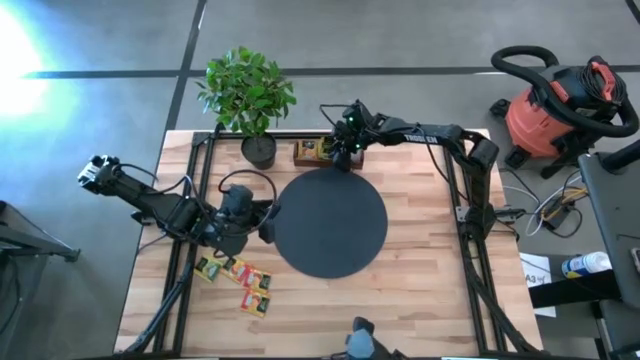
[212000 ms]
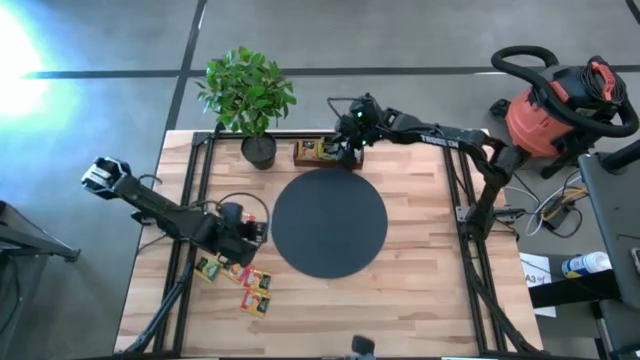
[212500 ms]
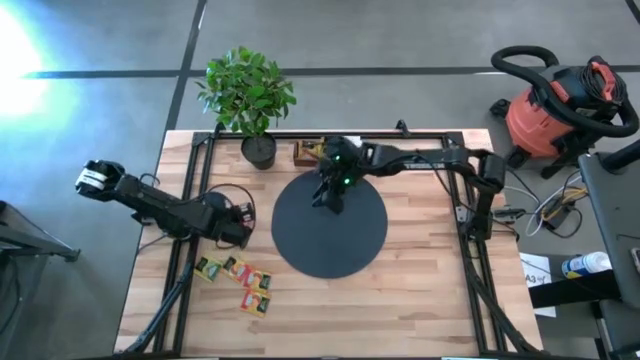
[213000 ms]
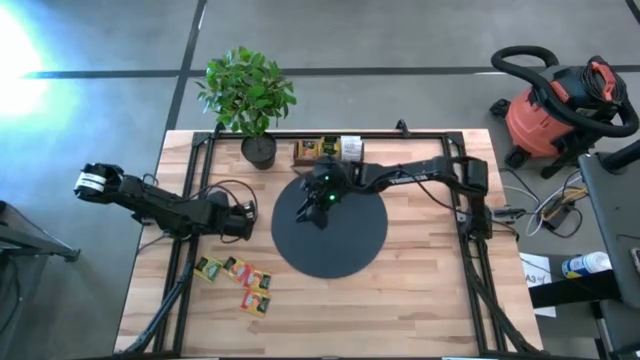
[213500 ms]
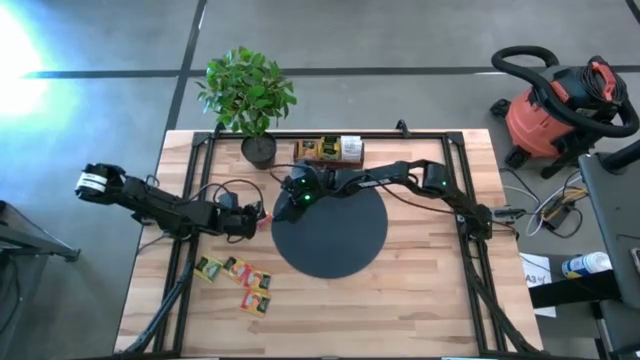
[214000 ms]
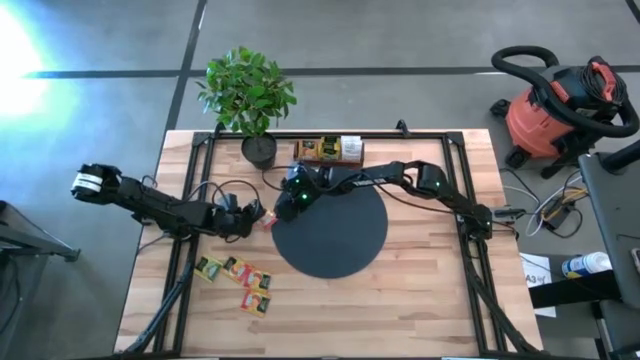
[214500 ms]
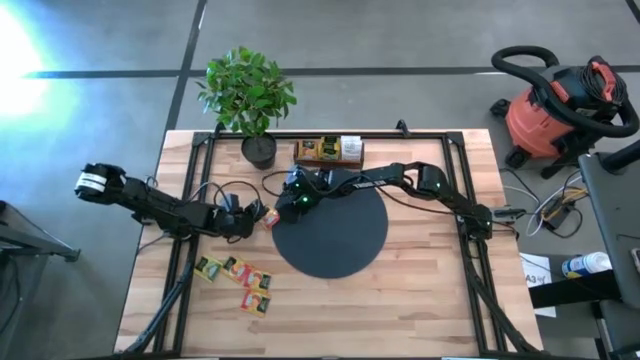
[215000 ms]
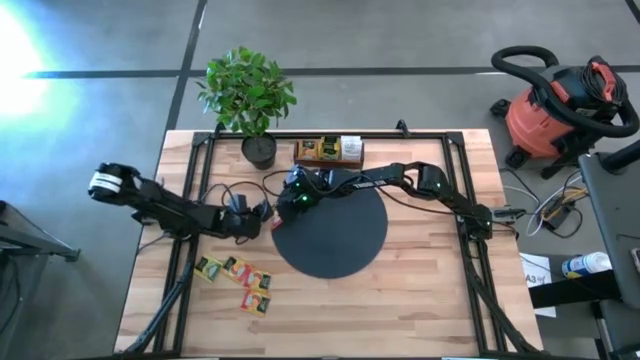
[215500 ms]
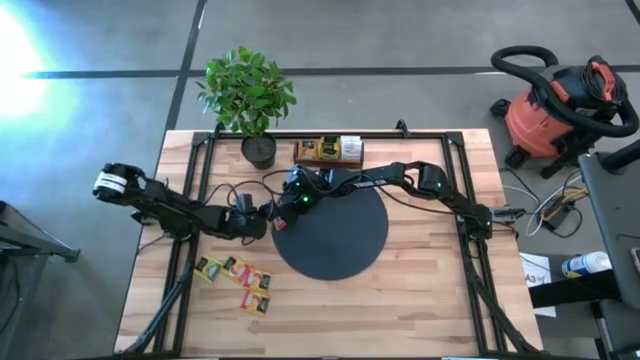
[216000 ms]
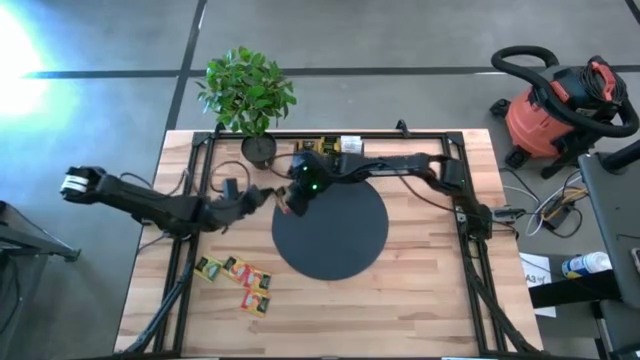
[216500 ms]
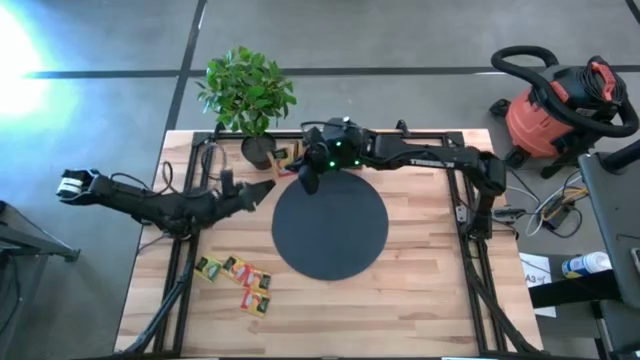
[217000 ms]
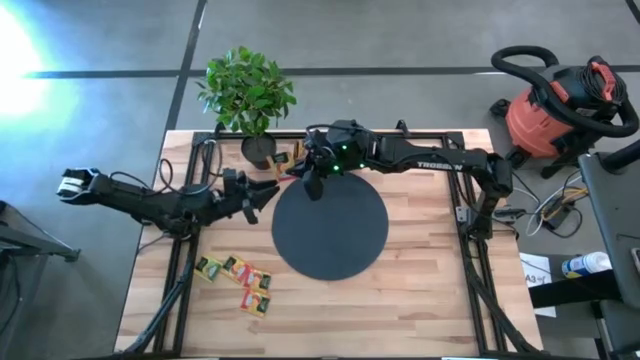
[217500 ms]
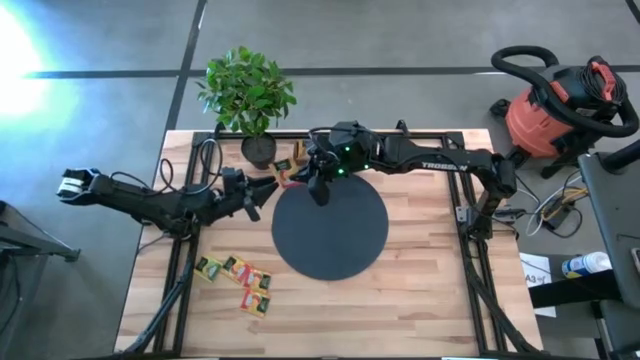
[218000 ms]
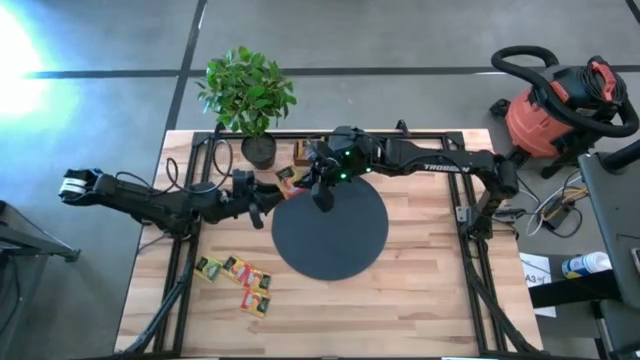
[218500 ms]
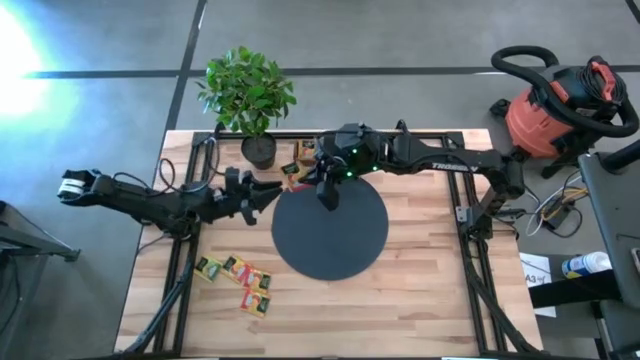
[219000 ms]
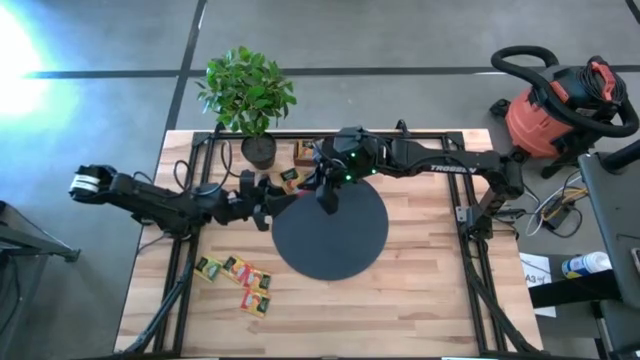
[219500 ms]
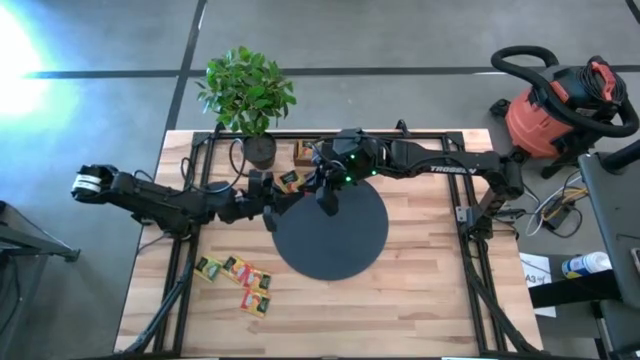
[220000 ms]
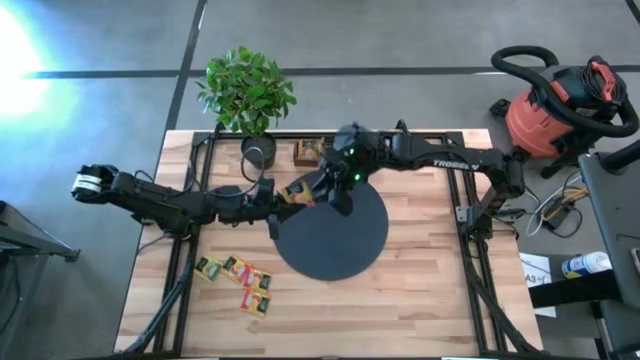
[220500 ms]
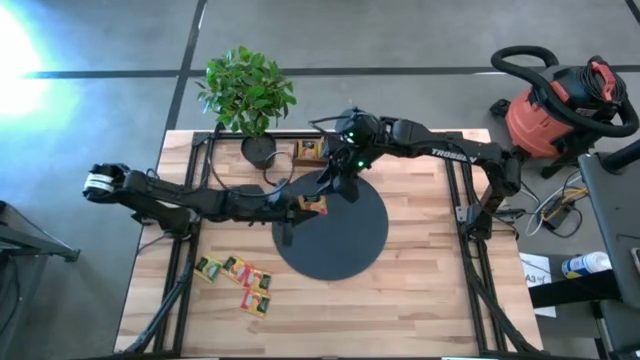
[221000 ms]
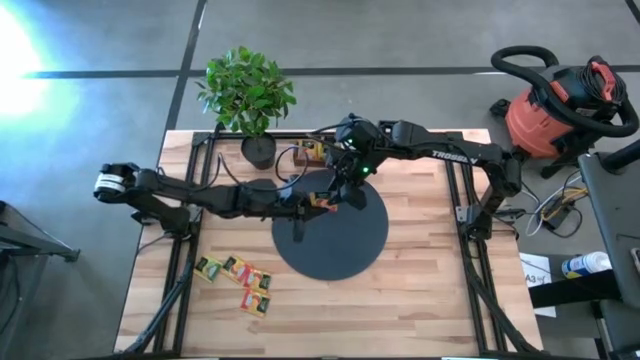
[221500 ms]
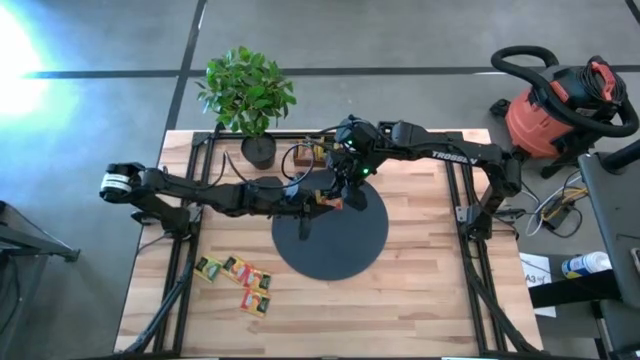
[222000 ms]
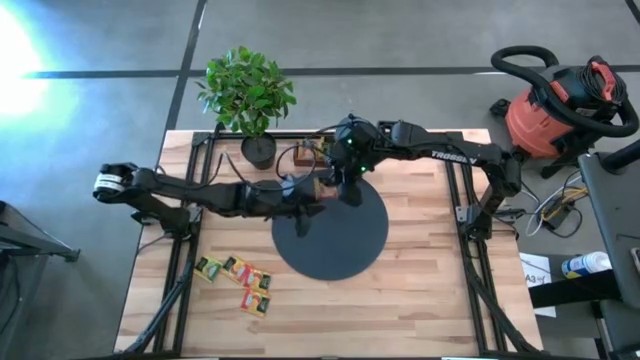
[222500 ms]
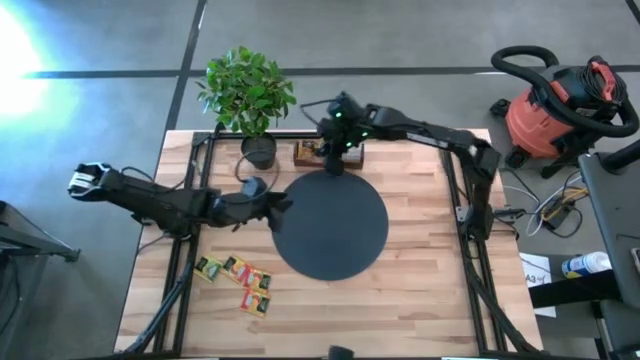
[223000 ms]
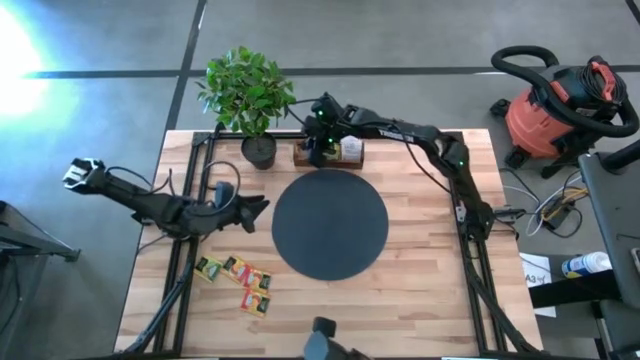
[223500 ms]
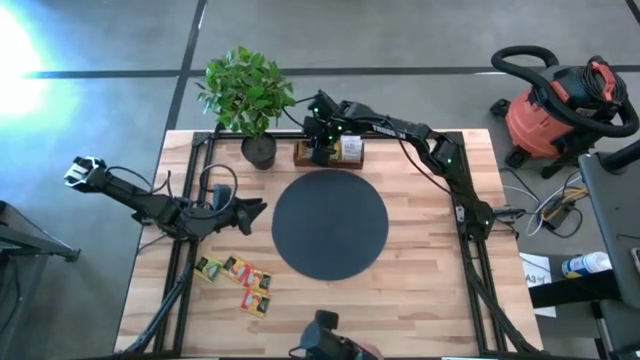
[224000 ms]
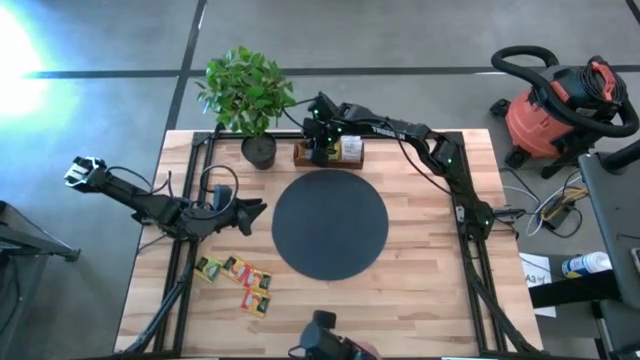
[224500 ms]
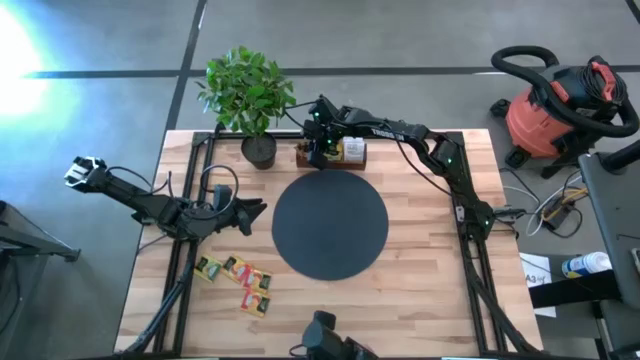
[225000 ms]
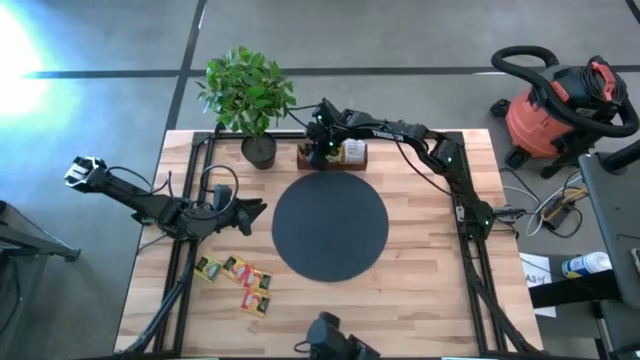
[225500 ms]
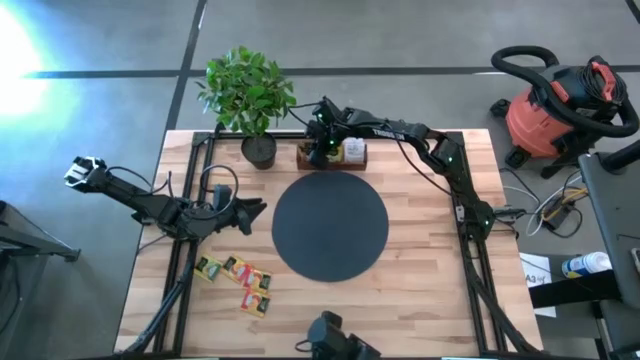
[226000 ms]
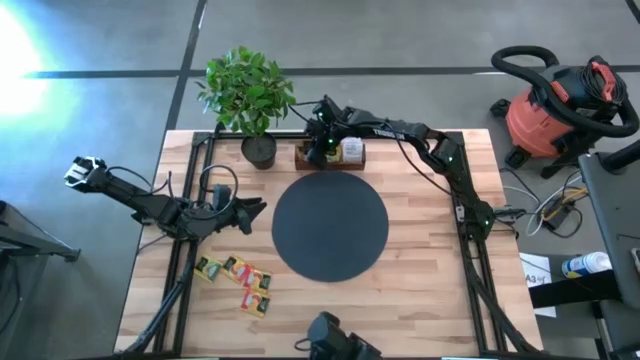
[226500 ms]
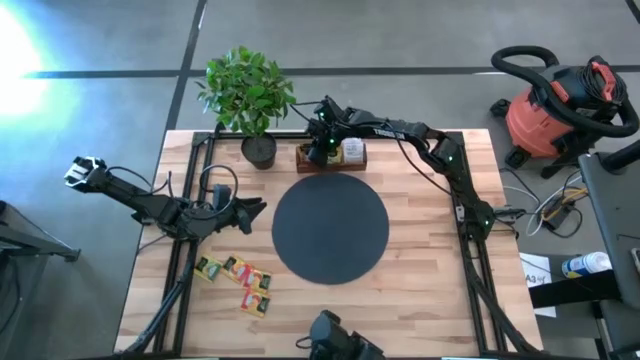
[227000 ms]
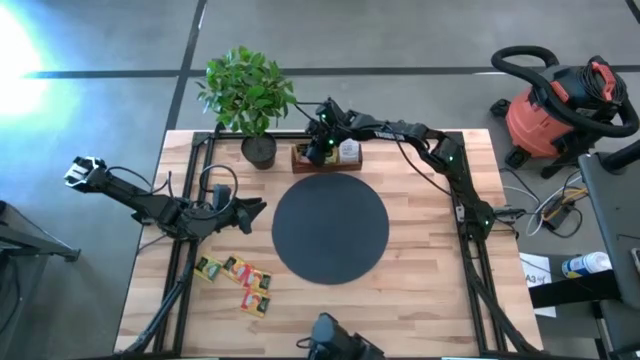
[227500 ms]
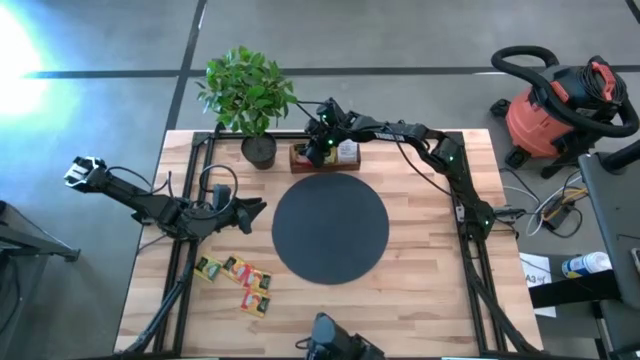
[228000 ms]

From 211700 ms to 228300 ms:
Task: Pick & Place Tea
Put the orange tea bag into the left slot of the wooden organizer

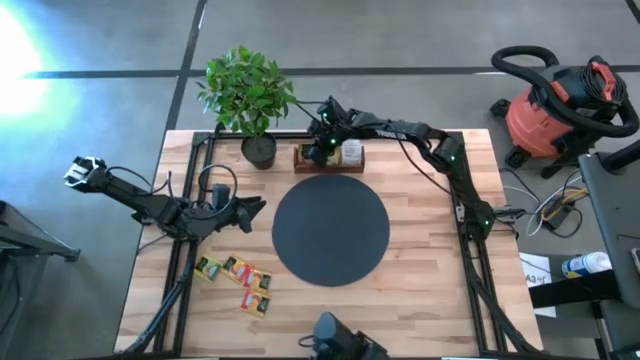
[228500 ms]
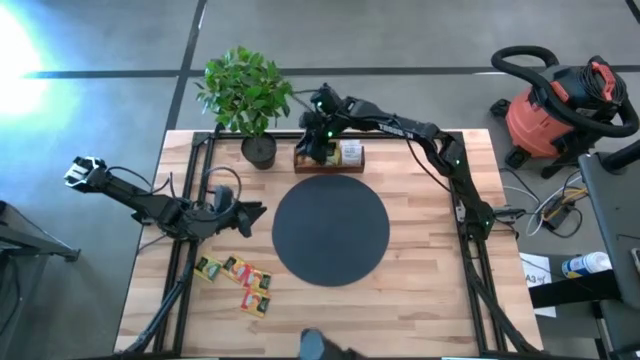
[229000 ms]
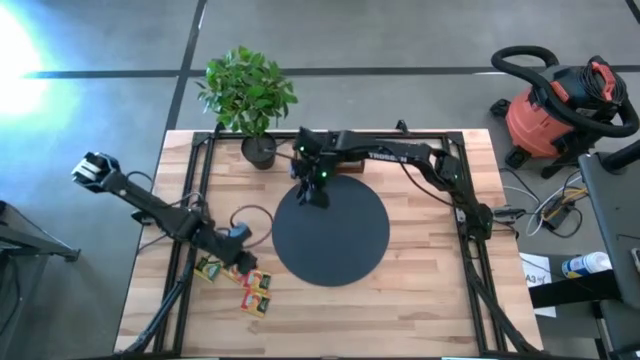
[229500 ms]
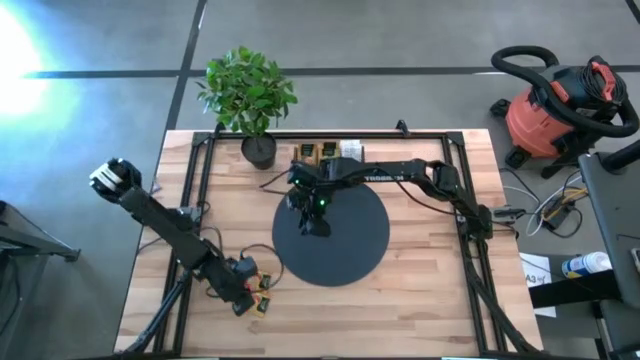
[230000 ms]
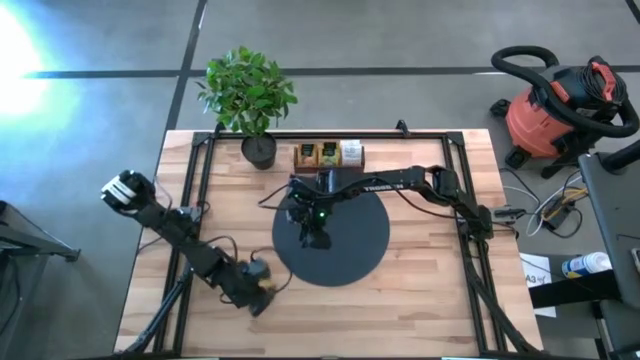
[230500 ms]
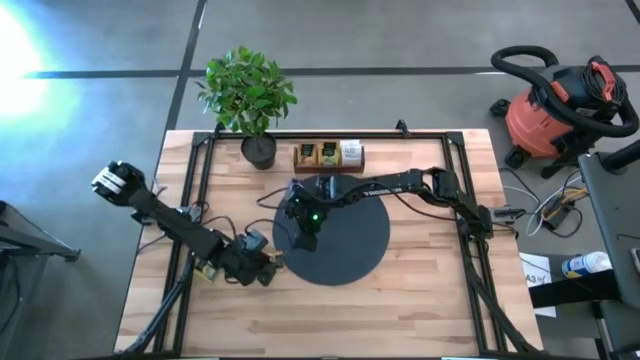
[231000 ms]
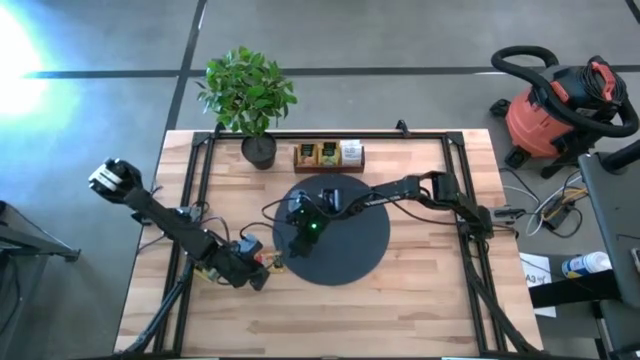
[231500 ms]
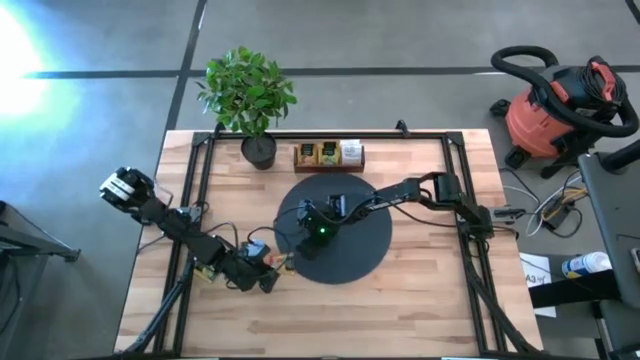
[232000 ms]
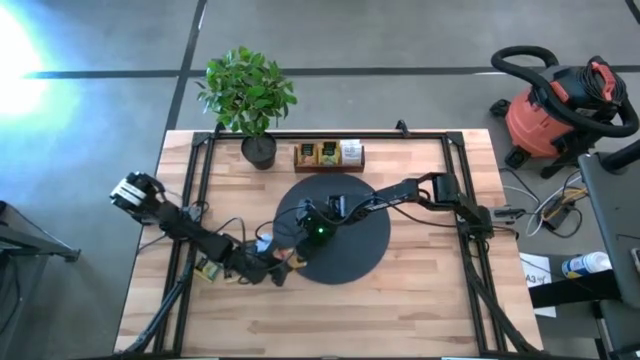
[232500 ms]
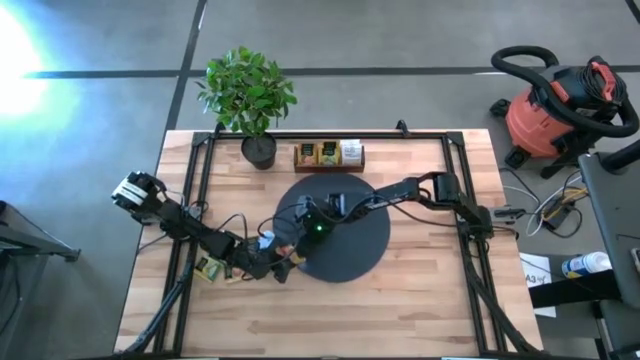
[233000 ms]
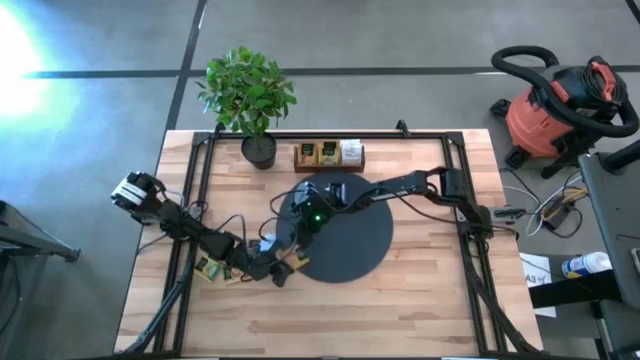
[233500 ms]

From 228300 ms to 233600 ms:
Put the bottom orange tea bag into the left slot of the wooden organizer
